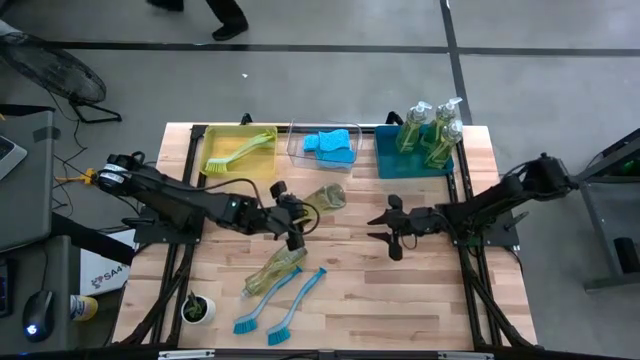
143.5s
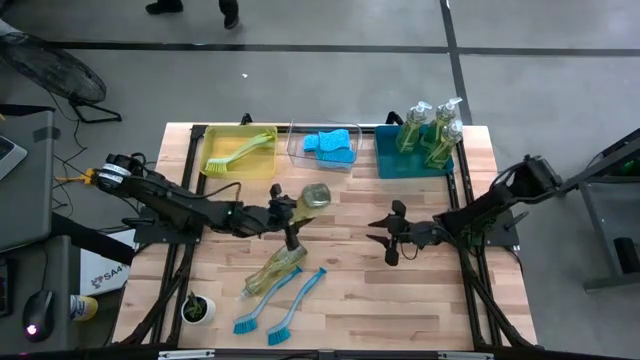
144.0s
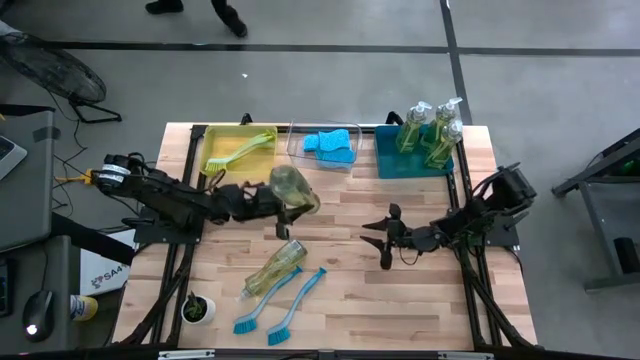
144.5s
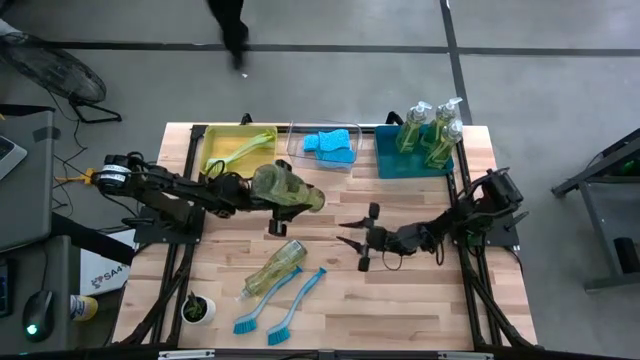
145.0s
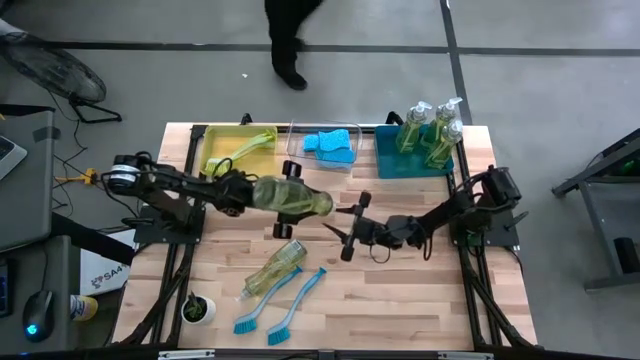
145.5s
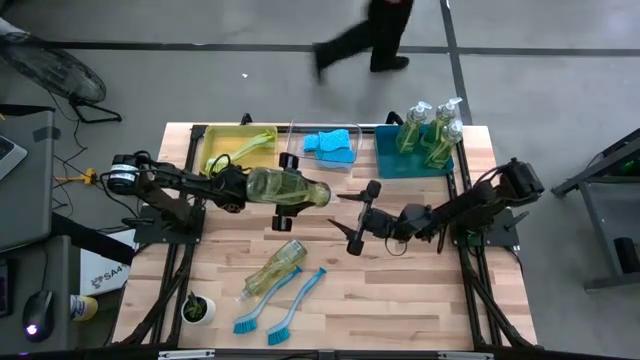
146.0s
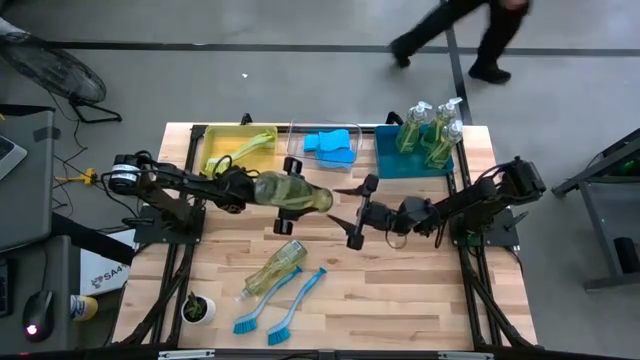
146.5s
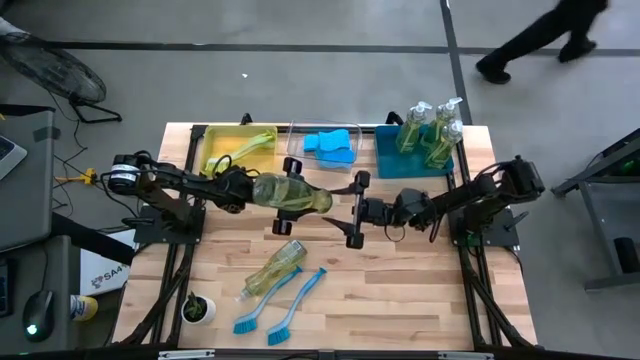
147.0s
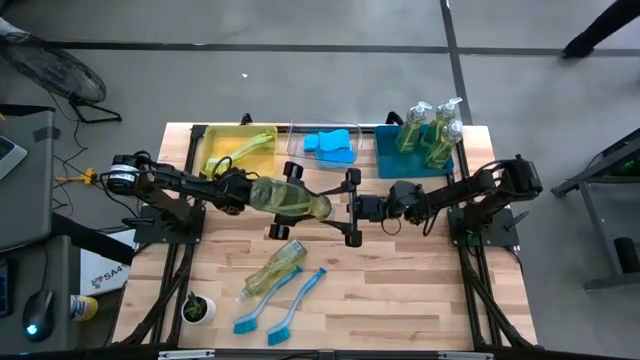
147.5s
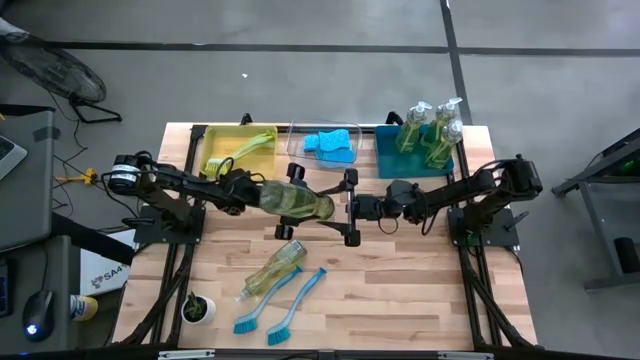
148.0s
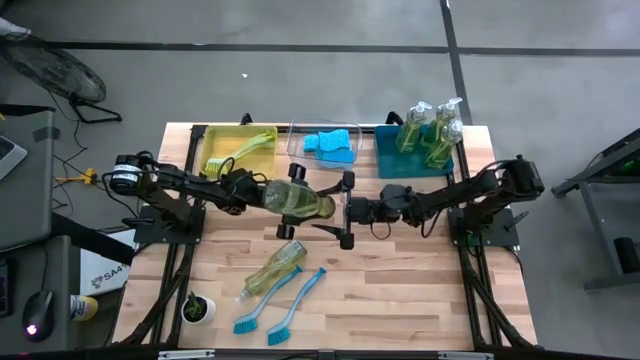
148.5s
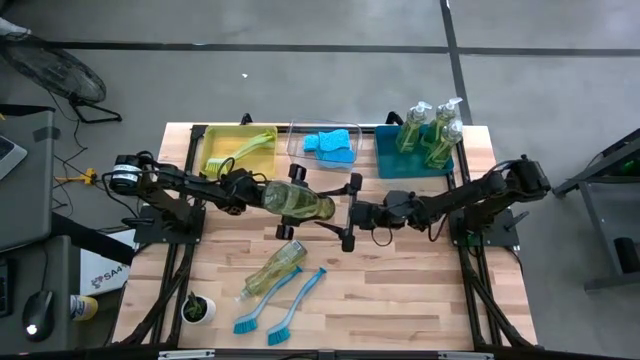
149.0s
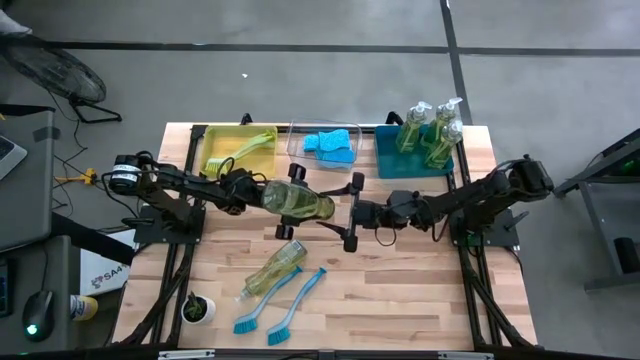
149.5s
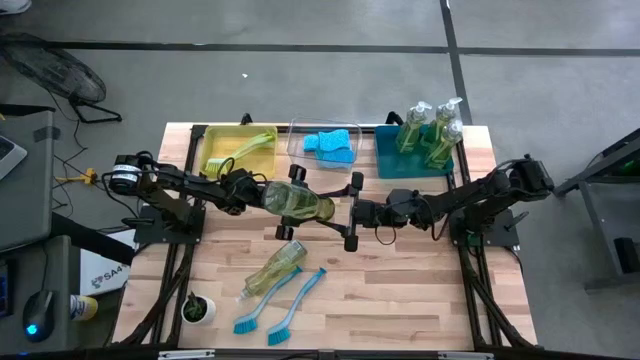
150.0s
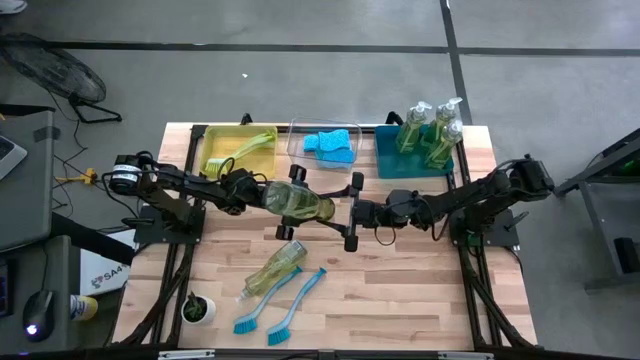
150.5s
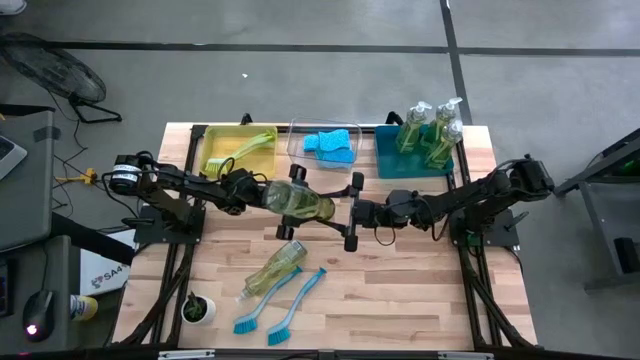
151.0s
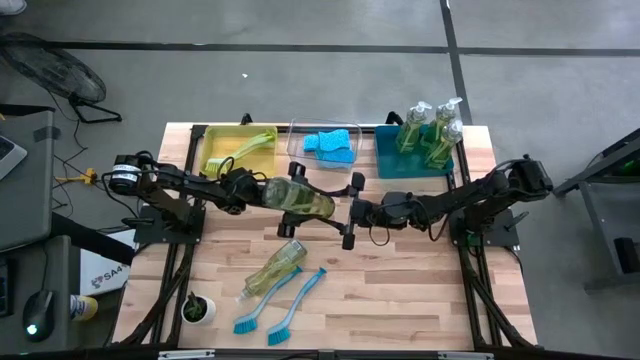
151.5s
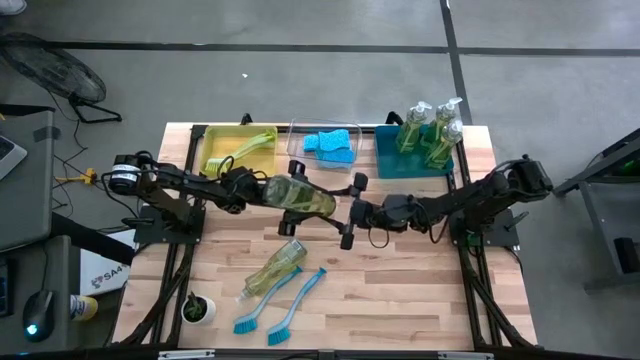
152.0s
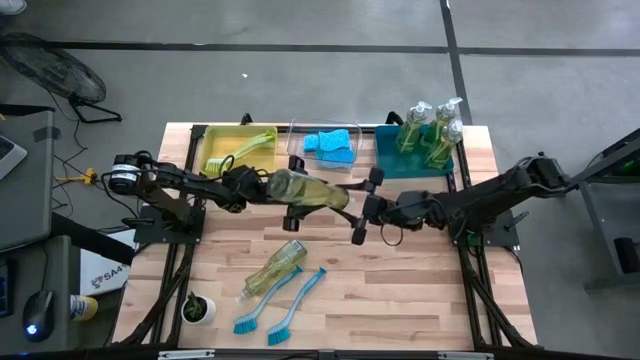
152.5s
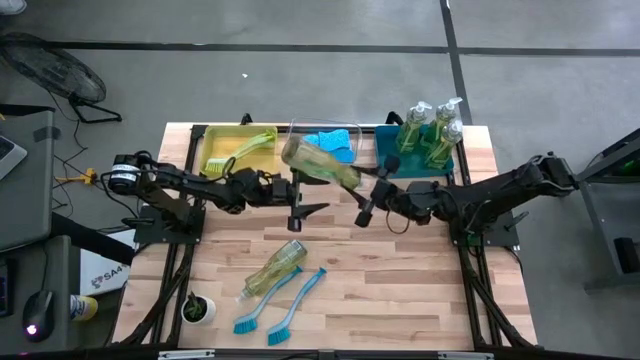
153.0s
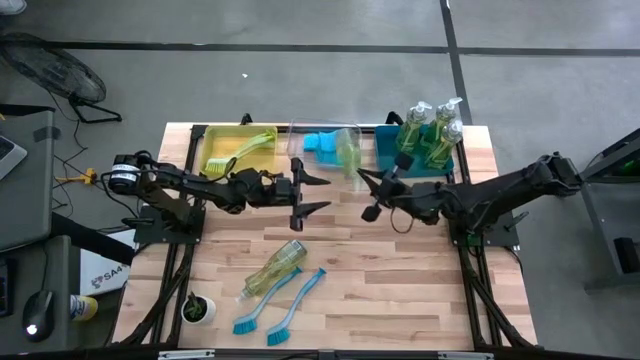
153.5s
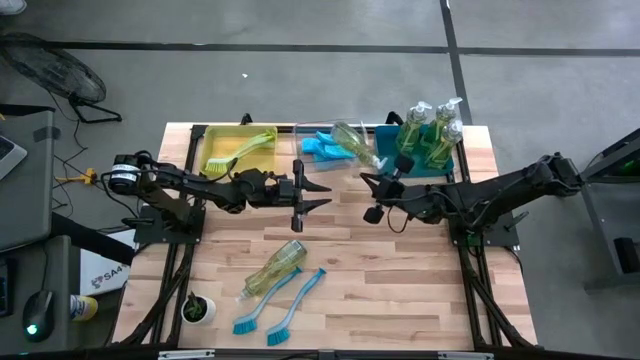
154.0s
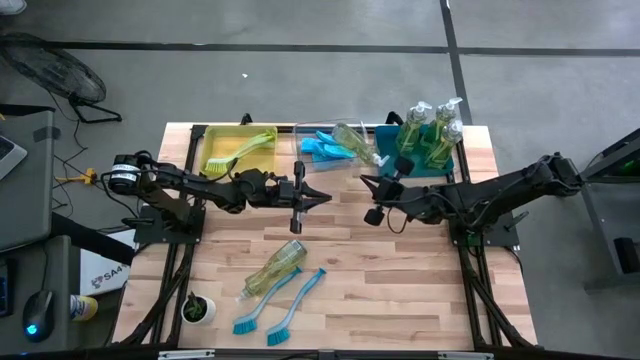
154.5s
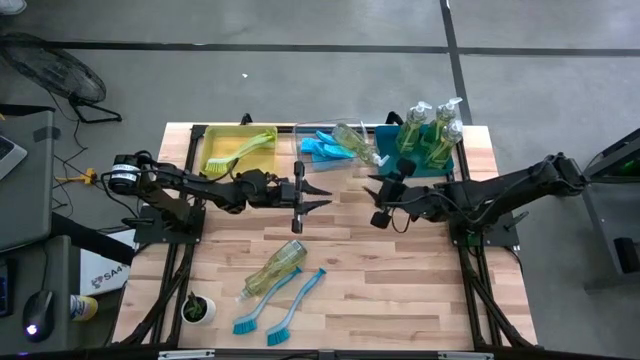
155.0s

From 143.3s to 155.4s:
Task: Pick & Place Kitchen Sink Supplies
Put the dish soap into the blue bin

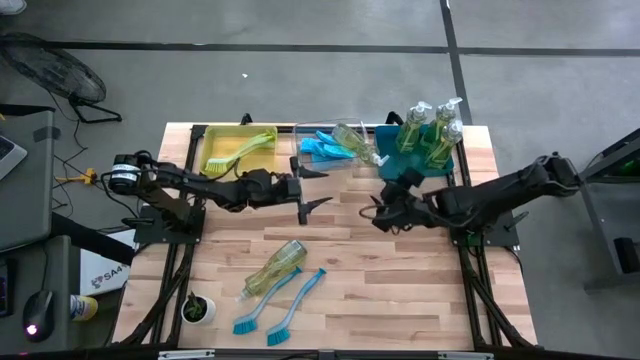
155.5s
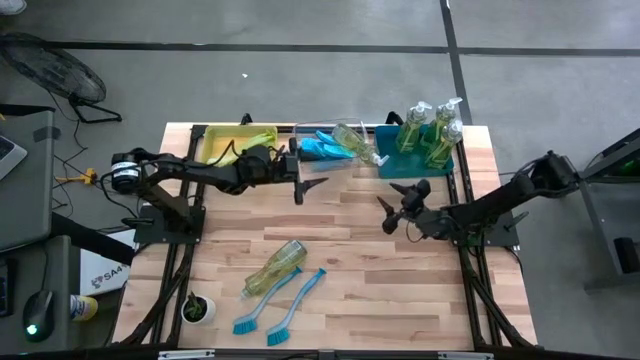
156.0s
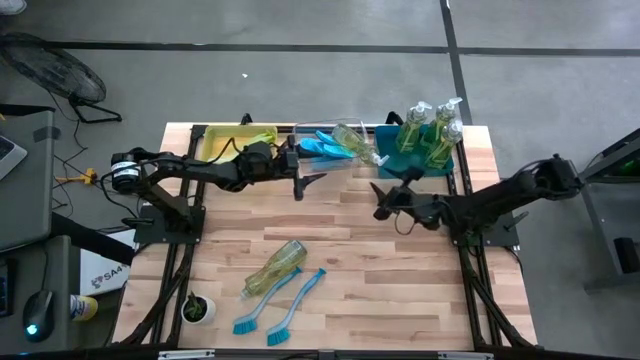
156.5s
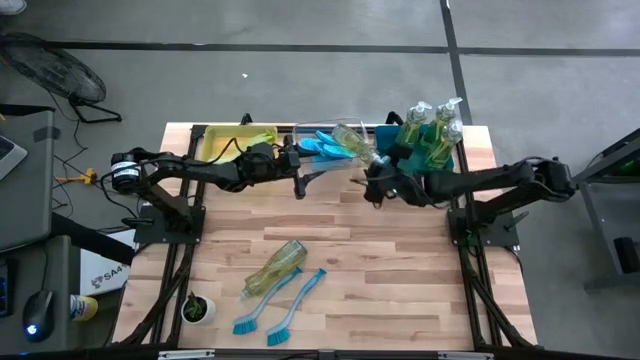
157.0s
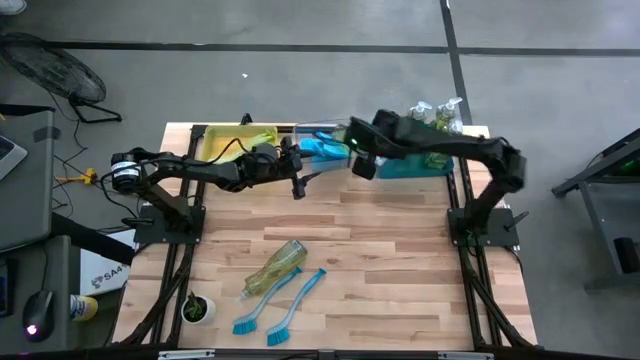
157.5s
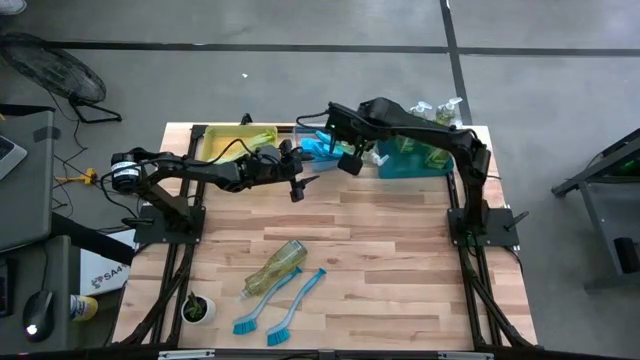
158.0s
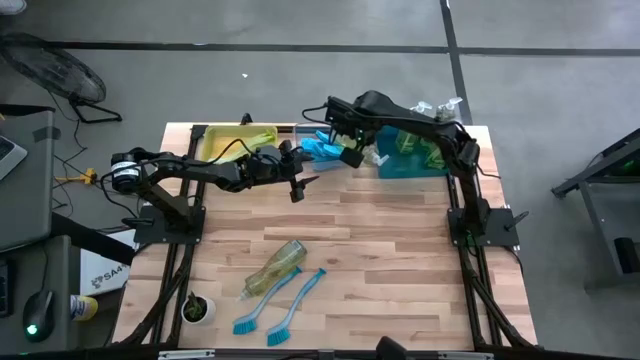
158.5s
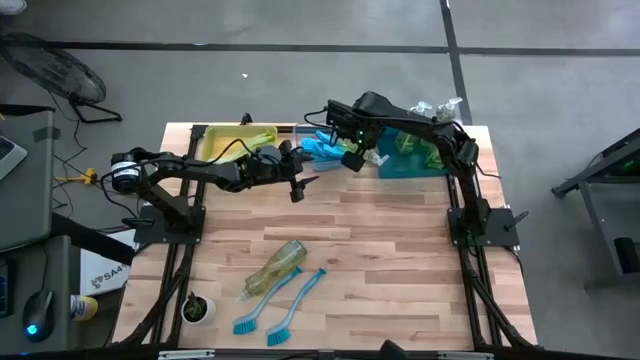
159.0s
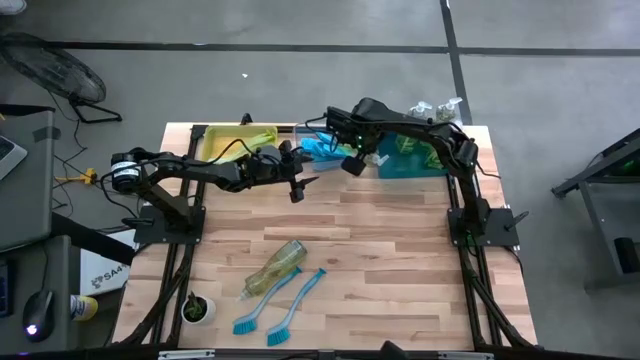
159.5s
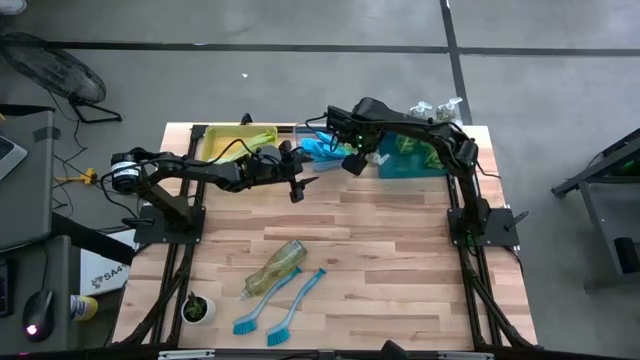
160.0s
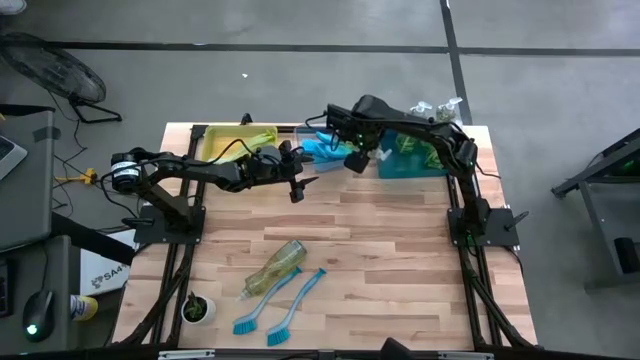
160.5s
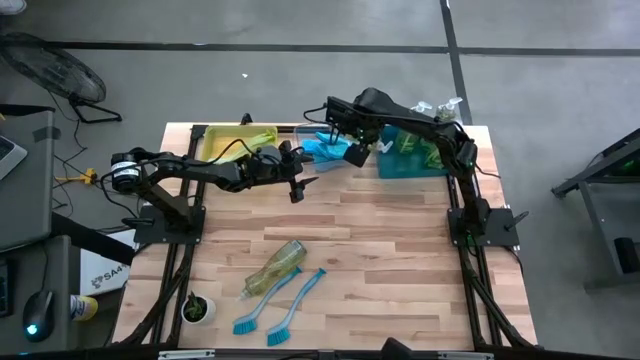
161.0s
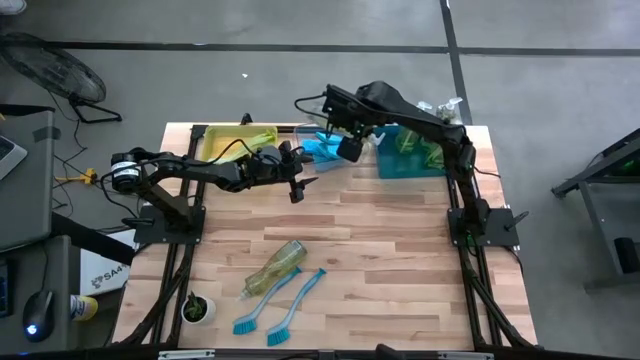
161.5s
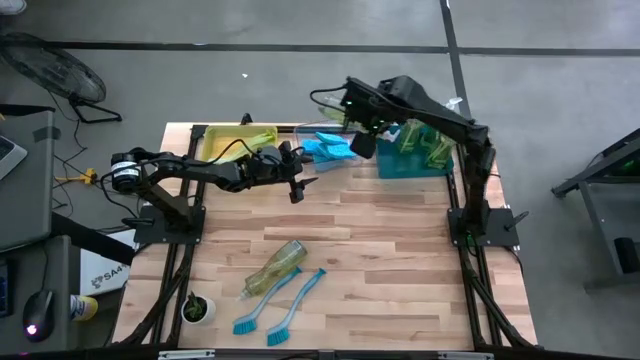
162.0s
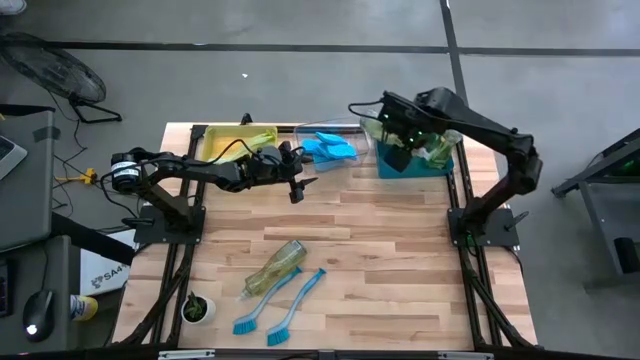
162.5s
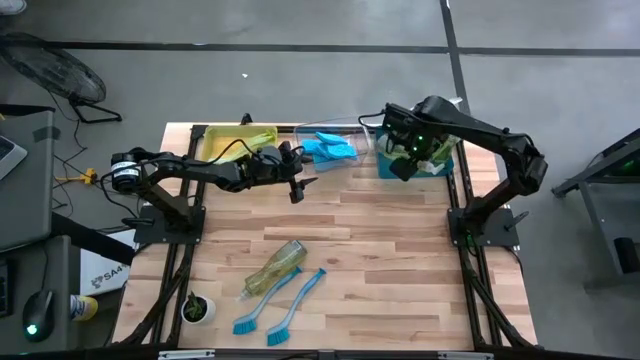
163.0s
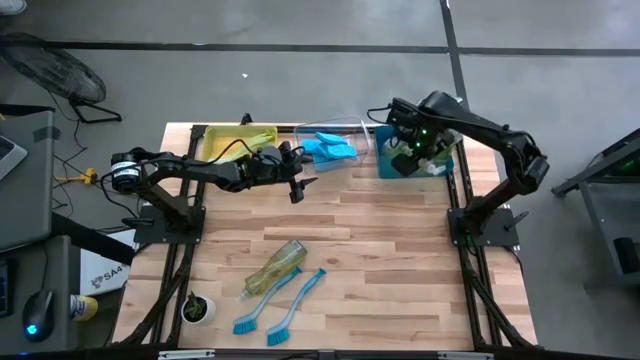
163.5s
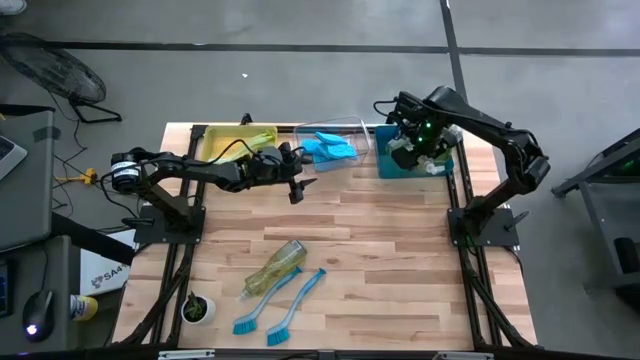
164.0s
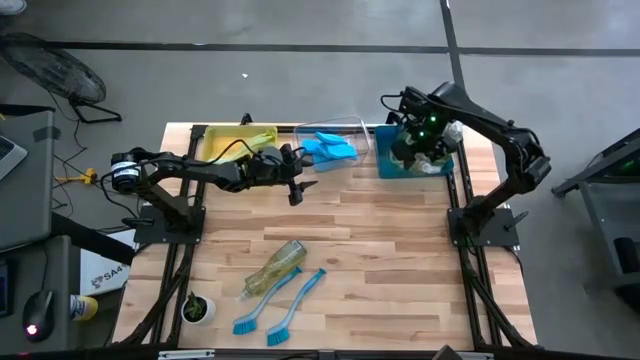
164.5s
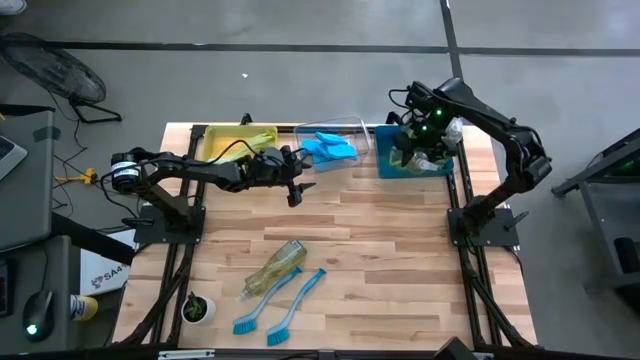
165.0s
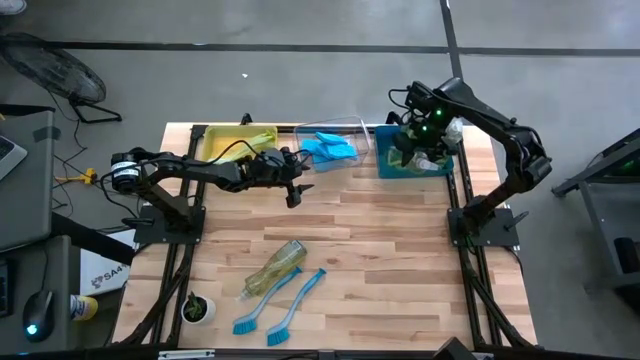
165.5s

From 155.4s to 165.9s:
Put the dish soap into the blue bin
